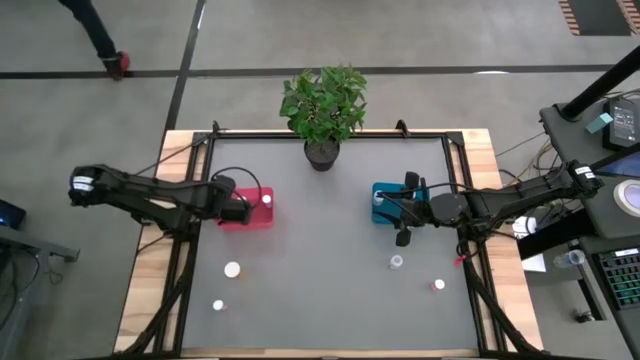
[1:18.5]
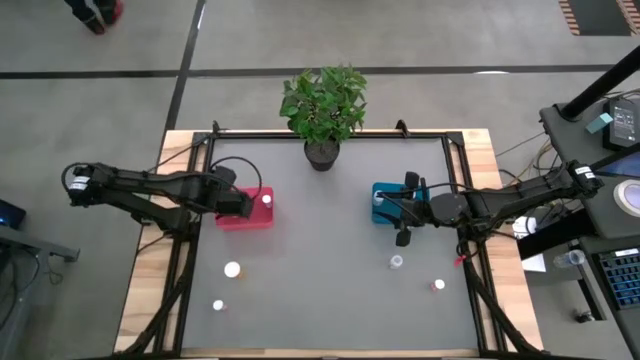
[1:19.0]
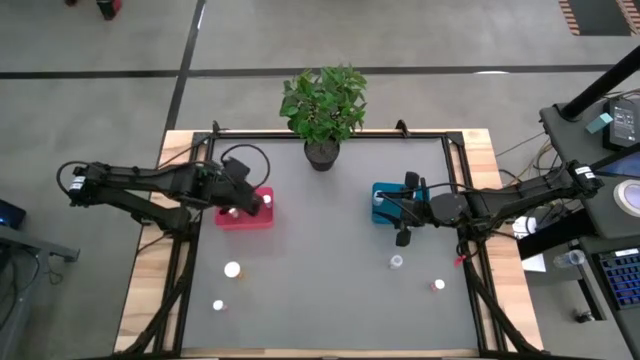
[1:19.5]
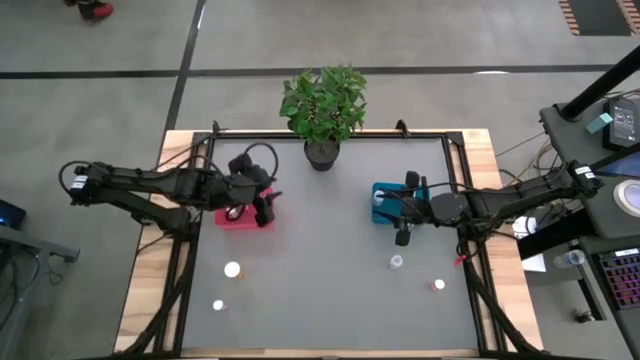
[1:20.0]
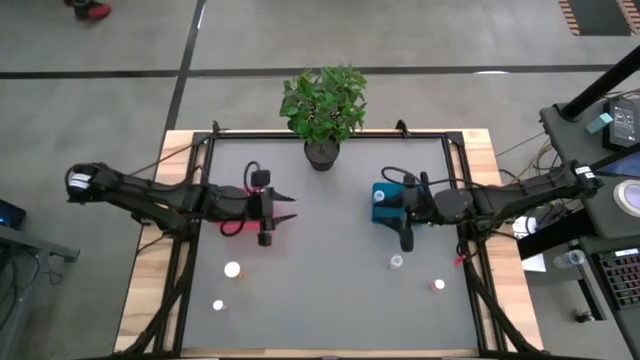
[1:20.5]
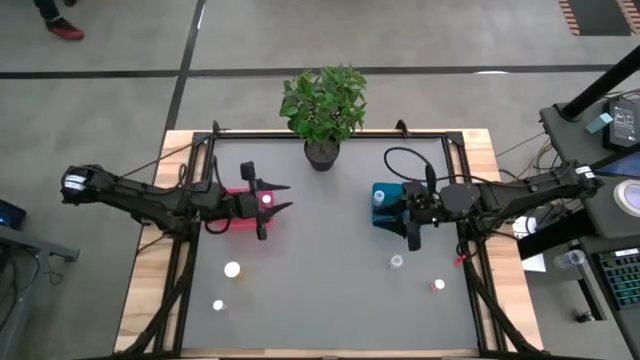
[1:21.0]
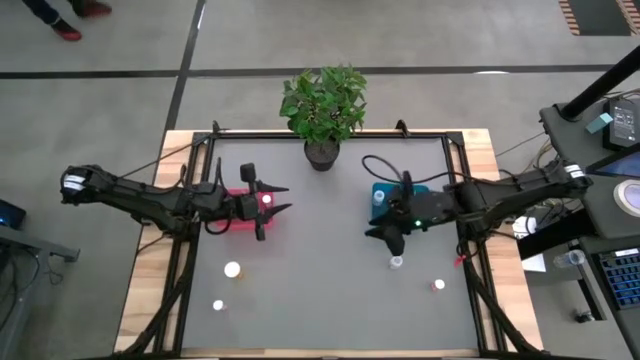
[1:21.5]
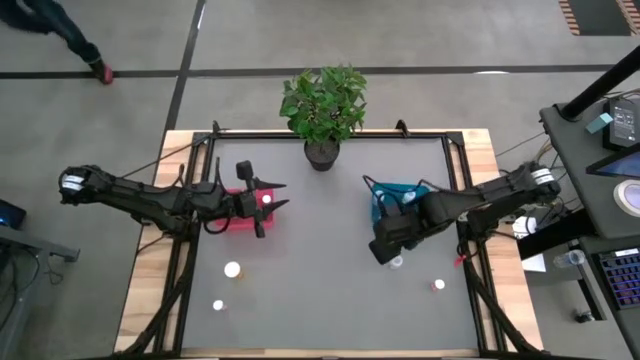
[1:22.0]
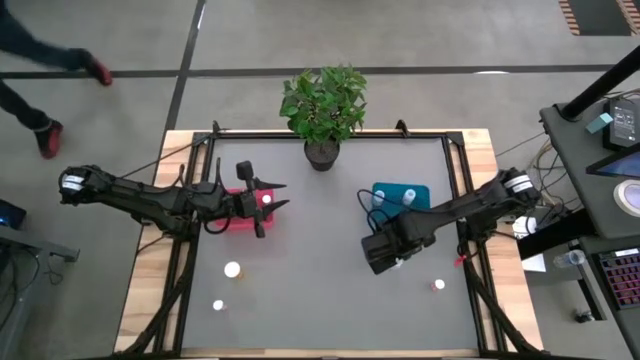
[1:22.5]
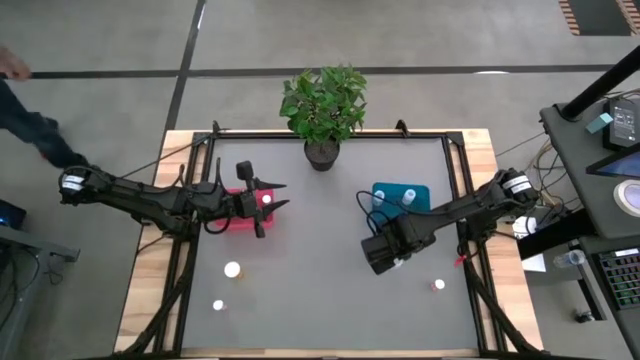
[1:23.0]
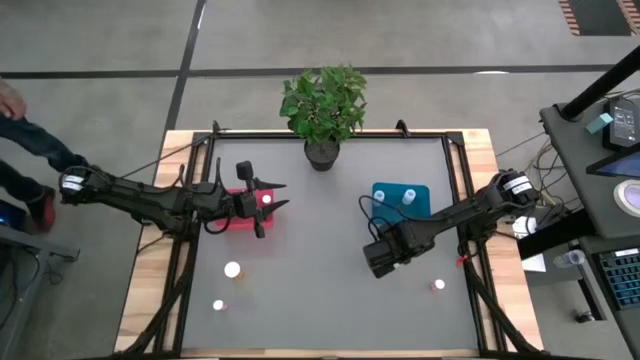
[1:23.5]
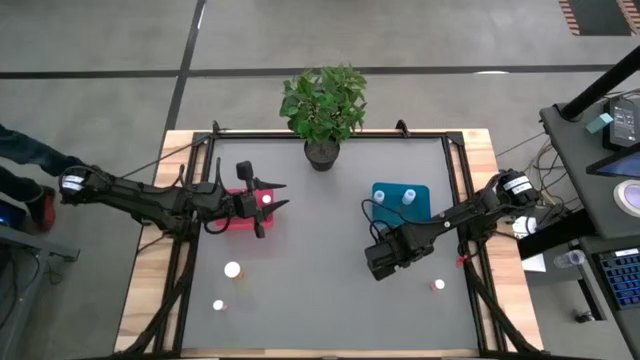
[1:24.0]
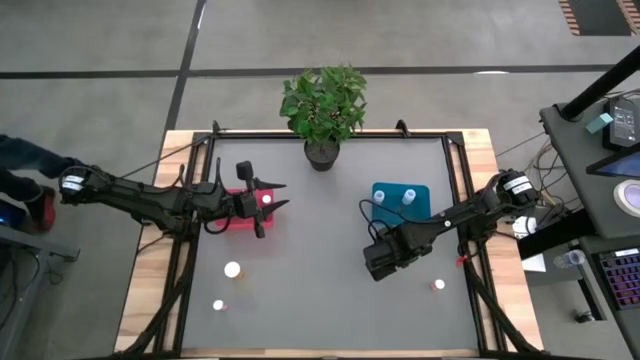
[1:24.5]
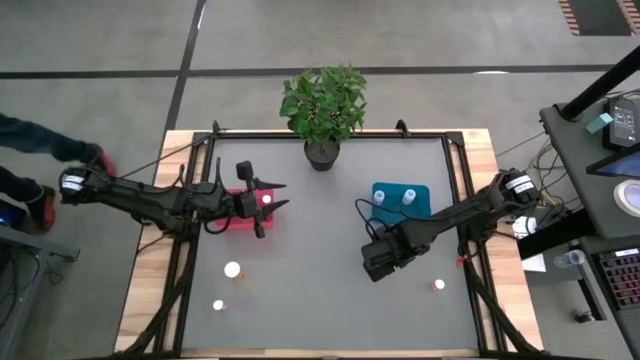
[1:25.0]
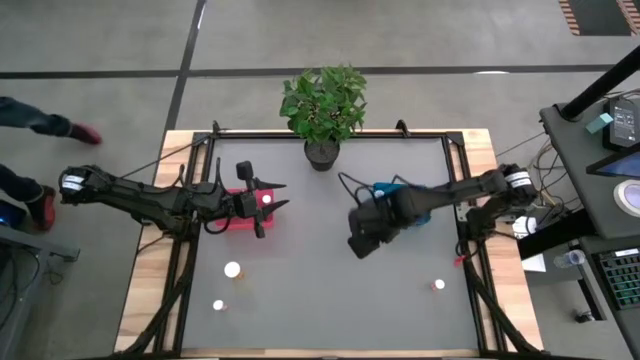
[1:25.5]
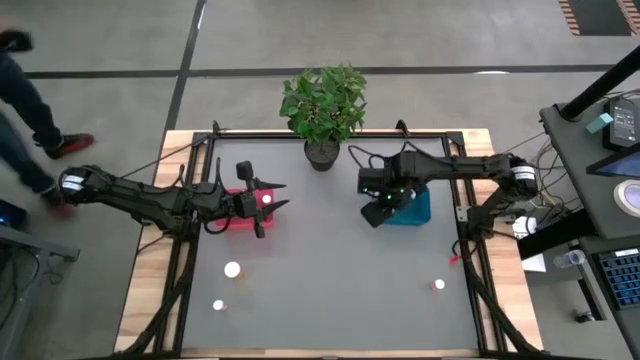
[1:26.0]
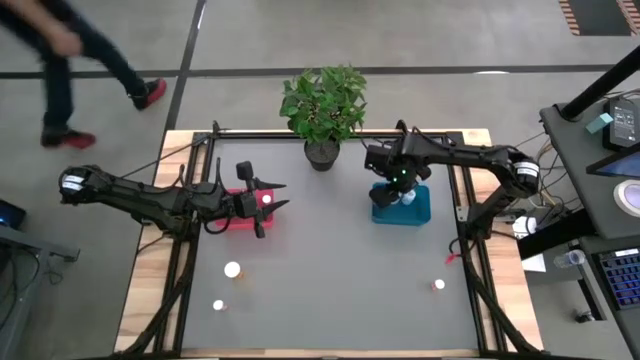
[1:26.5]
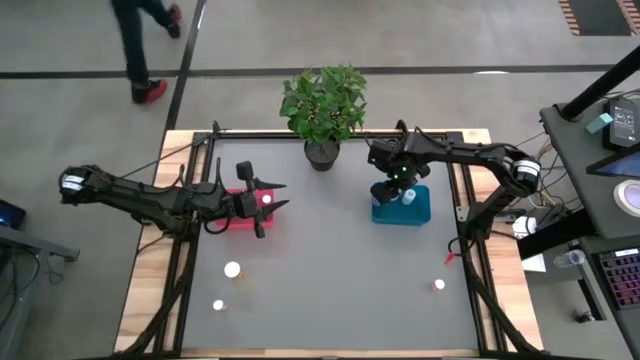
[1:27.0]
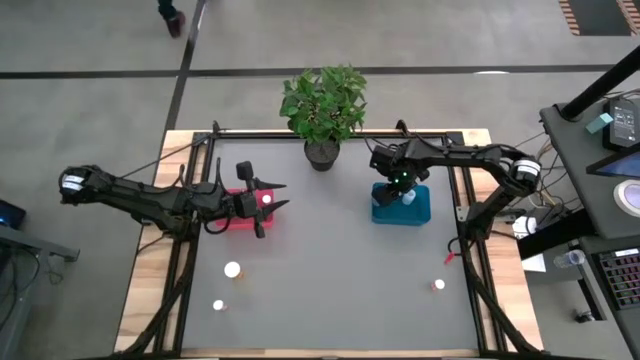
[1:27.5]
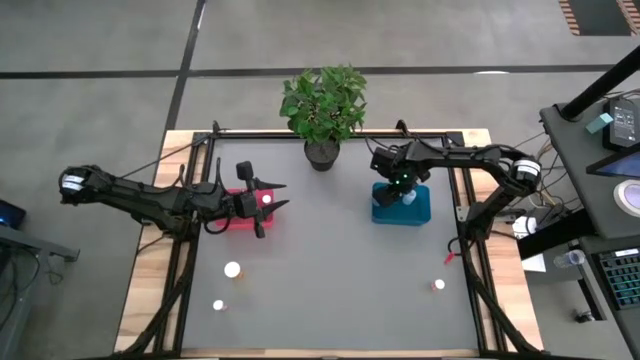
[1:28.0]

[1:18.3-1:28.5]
Task: Pick and place medicine bottles into bin by pill shape (circle, oval)
Put the transparent capsule bottle into the blue bin

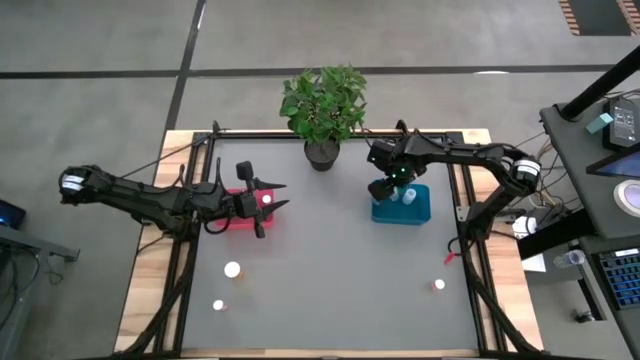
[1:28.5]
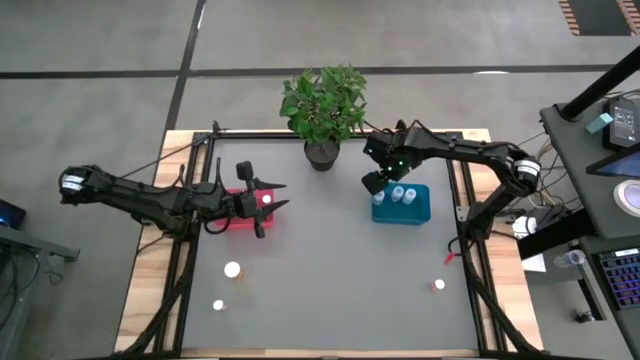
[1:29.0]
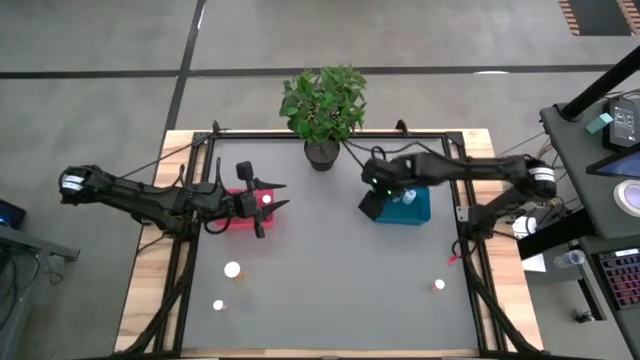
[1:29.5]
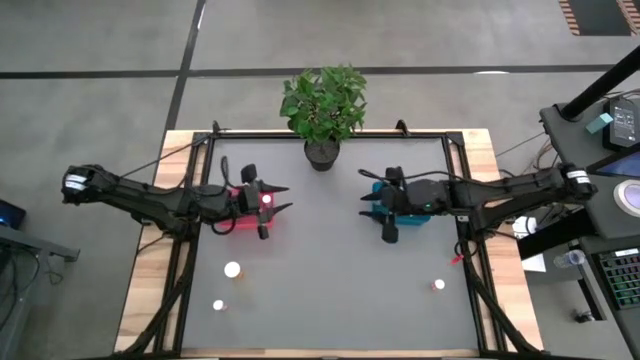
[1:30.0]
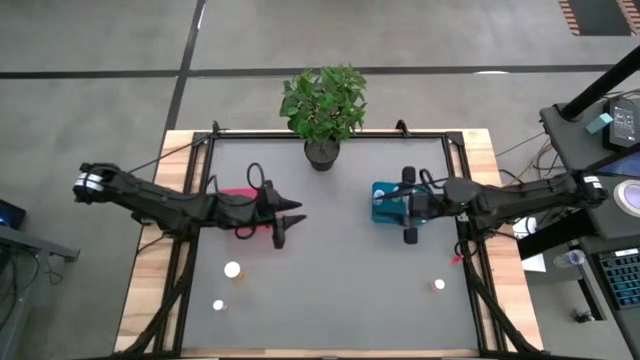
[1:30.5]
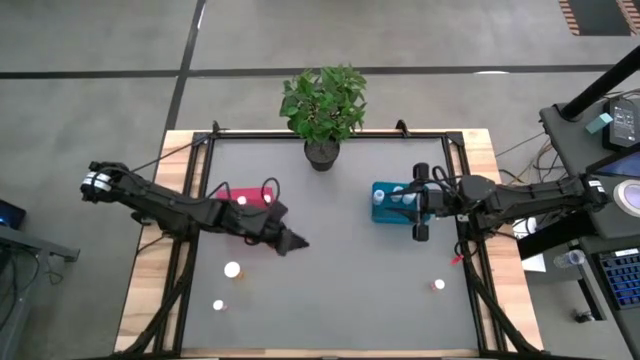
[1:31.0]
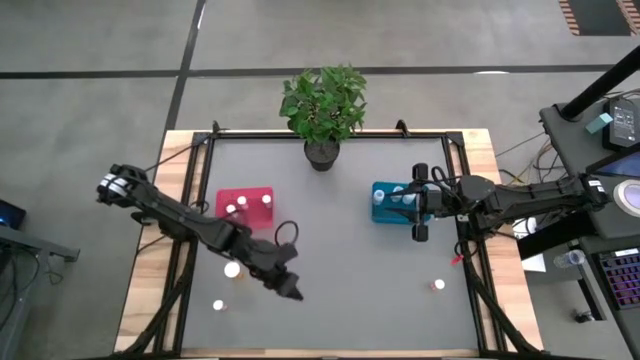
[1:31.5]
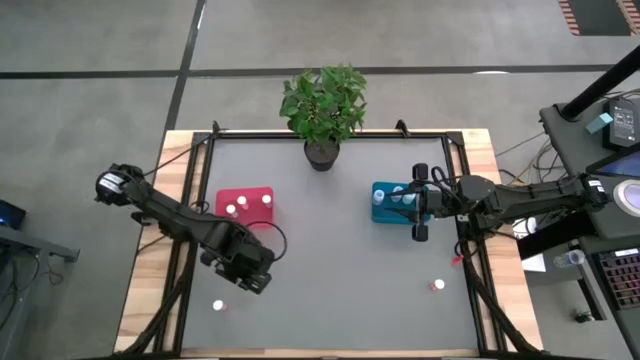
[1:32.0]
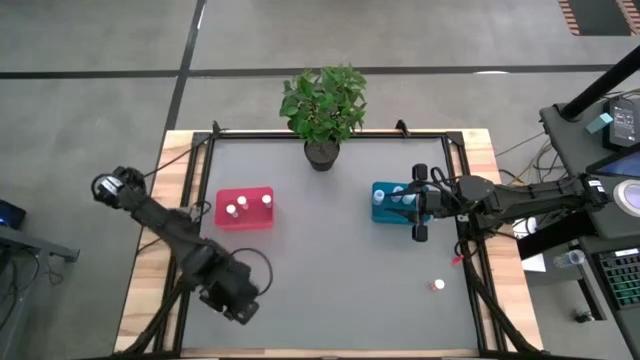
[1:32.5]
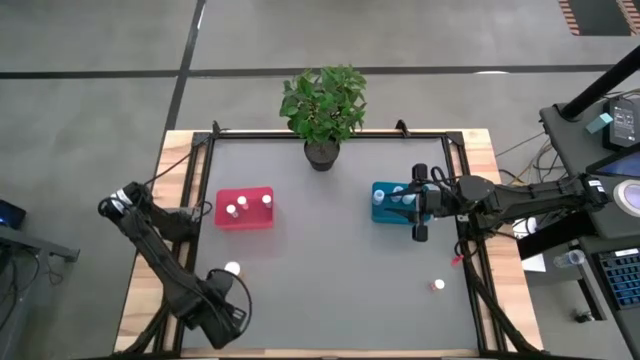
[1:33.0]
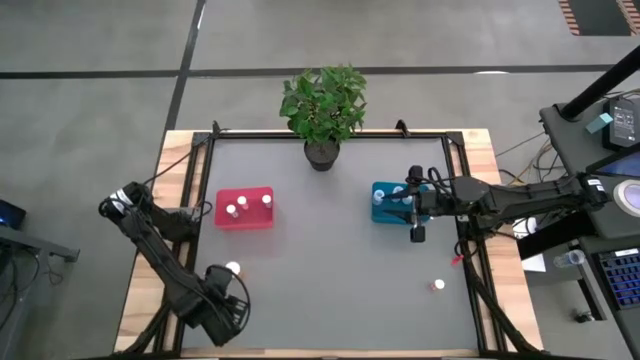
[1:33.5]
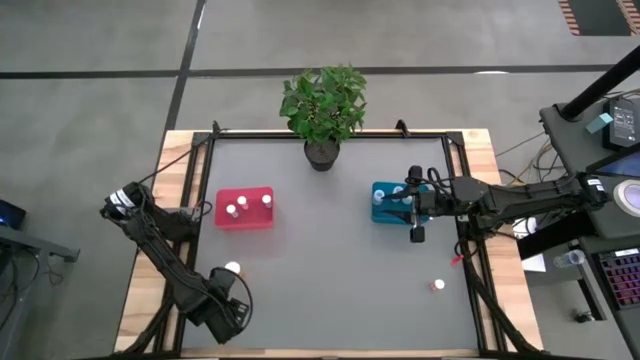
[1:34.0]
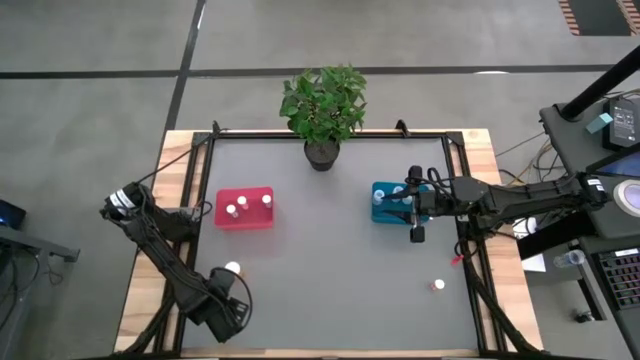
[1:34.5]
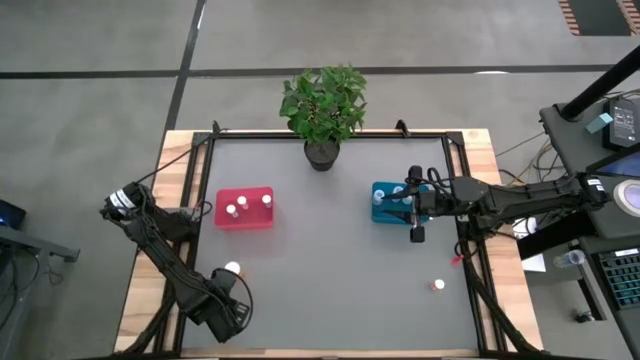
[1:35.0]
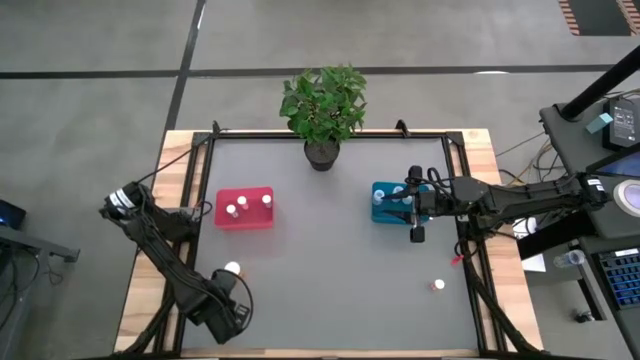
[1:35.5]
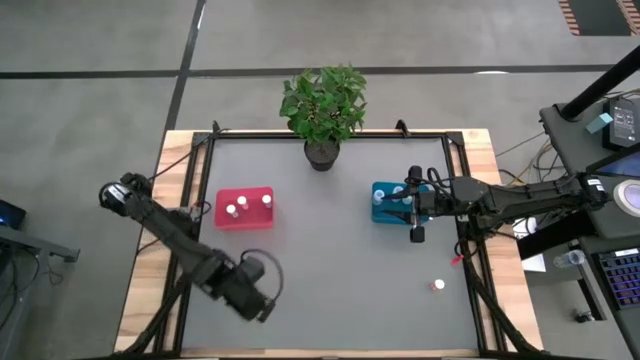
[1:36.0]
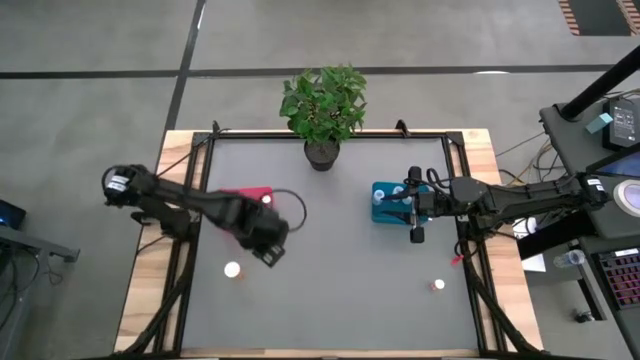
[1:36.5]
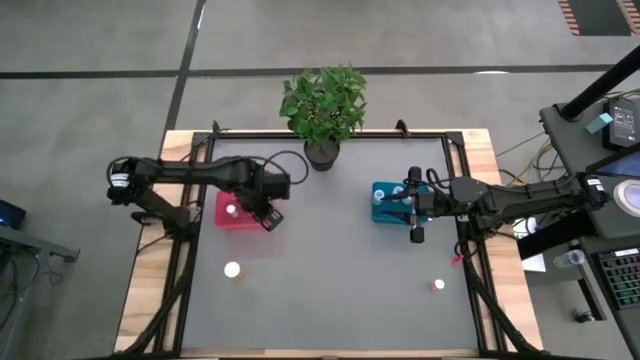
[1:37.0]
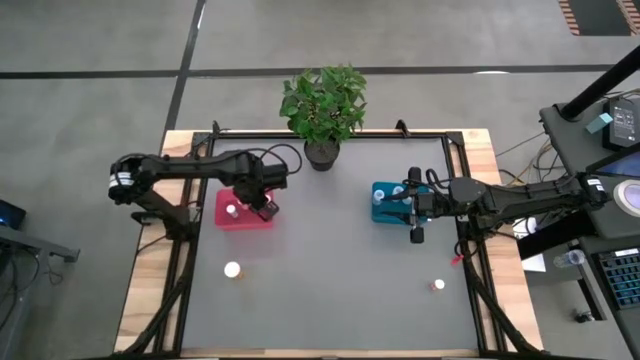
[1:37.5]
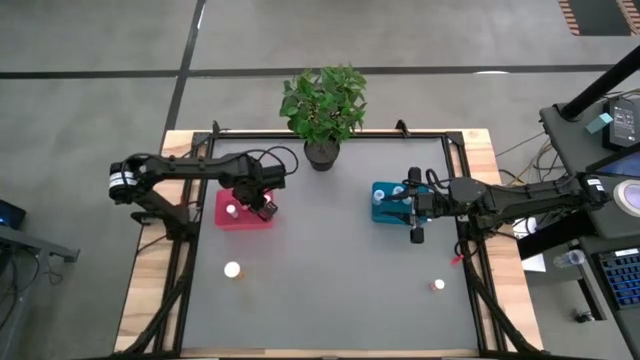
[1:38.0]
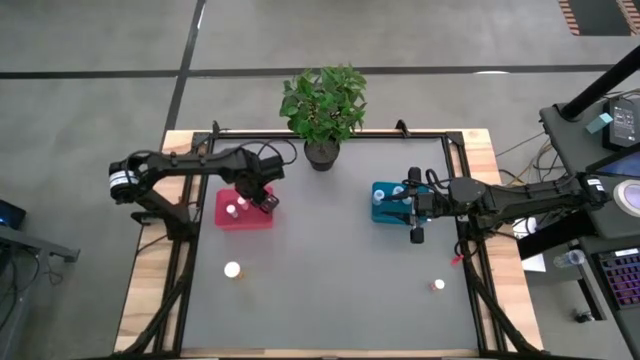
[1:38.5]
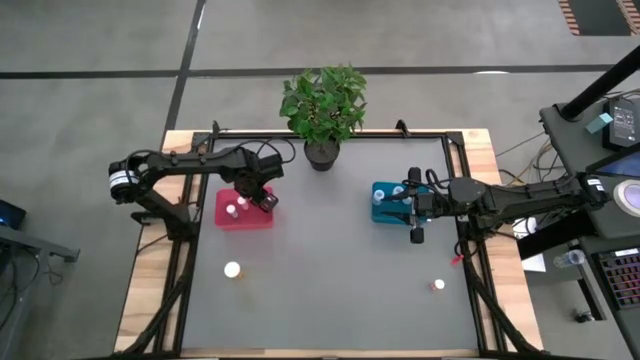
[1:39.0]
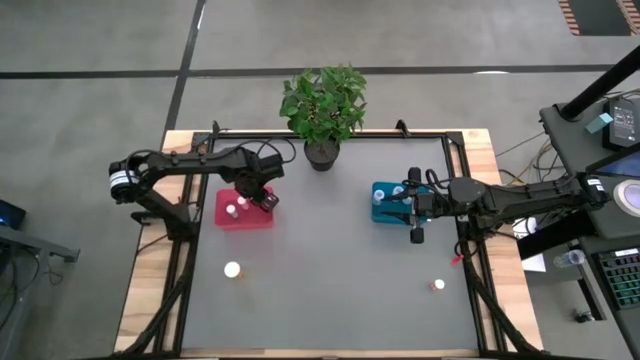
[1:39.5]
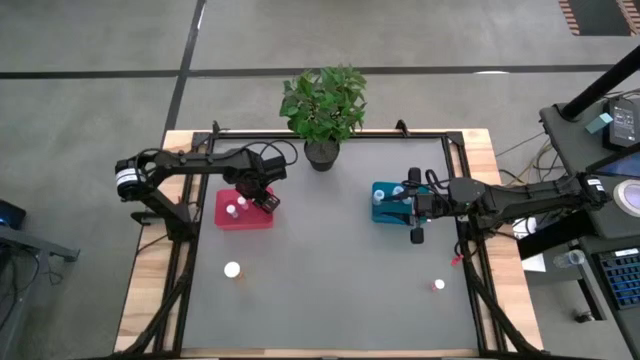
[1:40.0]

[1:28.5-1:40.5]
Put the pink tablet bottle into the red bin
